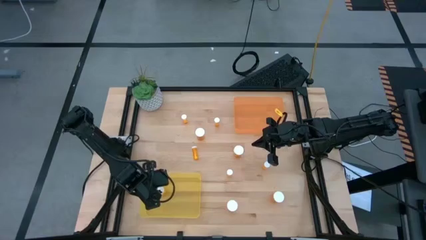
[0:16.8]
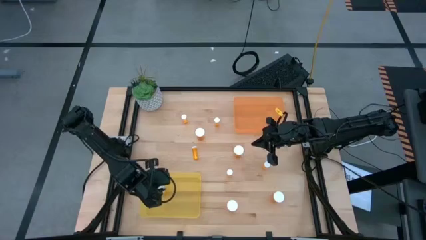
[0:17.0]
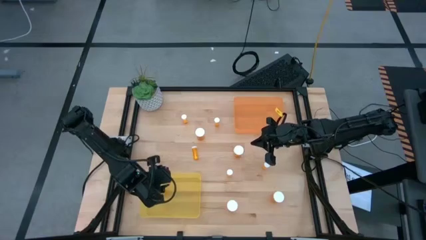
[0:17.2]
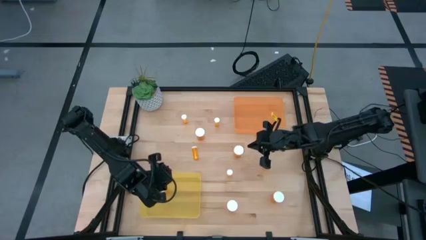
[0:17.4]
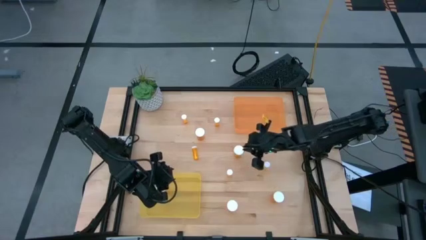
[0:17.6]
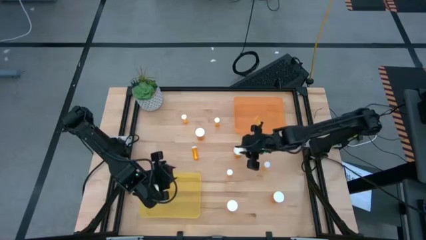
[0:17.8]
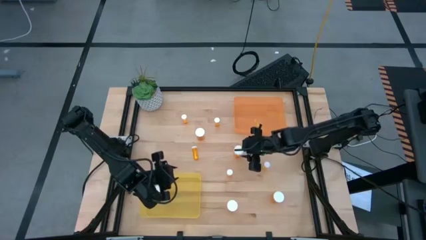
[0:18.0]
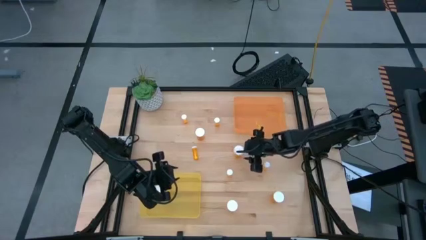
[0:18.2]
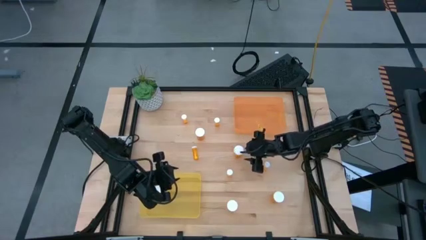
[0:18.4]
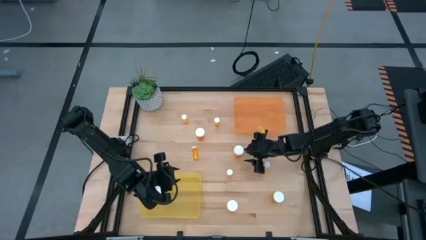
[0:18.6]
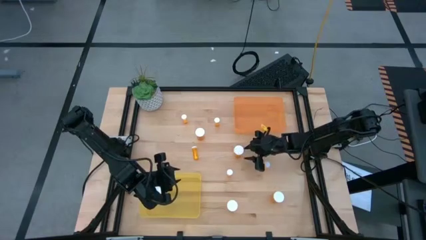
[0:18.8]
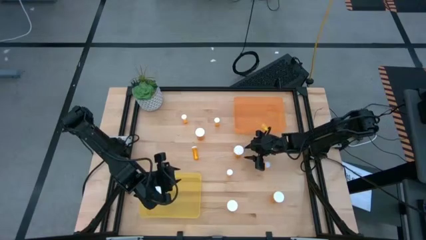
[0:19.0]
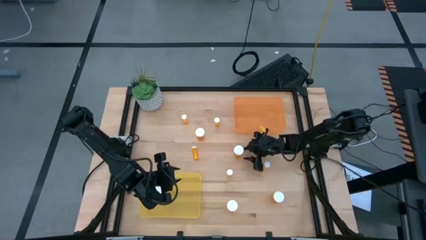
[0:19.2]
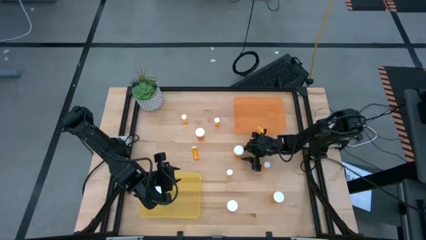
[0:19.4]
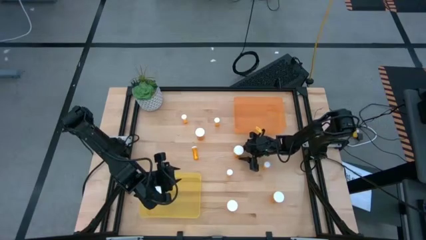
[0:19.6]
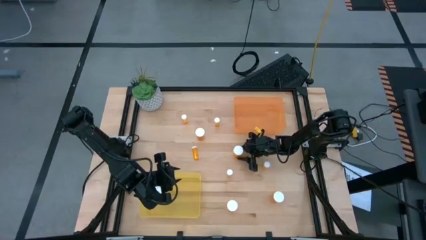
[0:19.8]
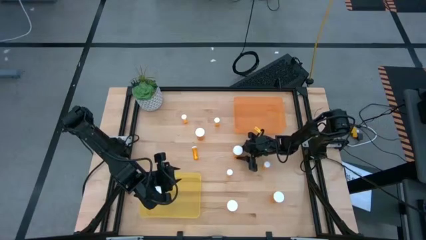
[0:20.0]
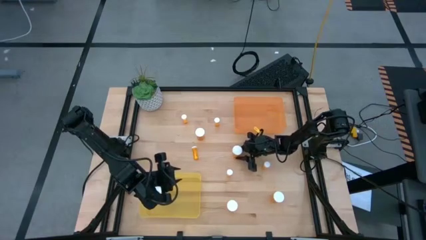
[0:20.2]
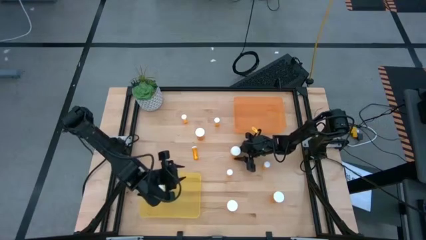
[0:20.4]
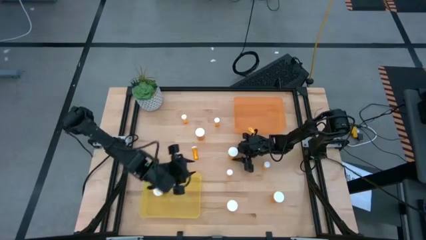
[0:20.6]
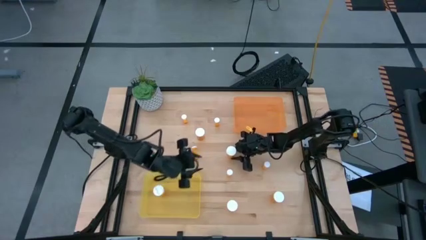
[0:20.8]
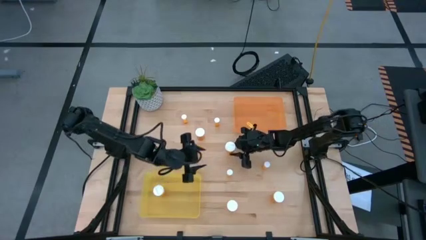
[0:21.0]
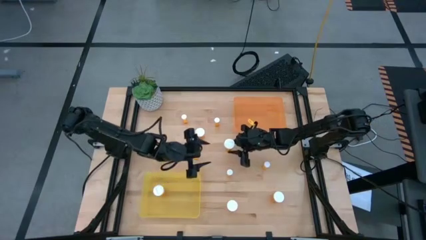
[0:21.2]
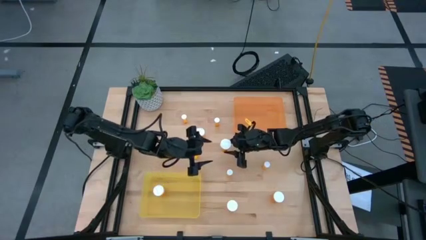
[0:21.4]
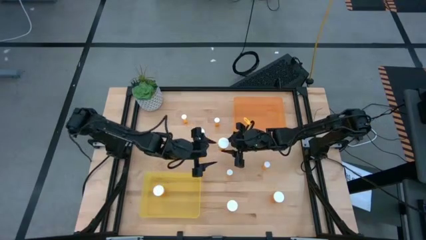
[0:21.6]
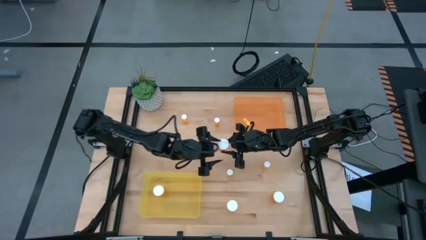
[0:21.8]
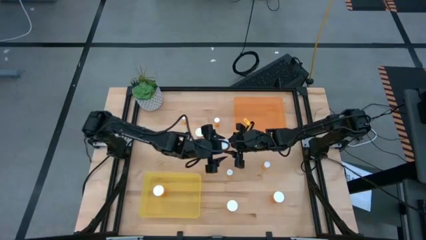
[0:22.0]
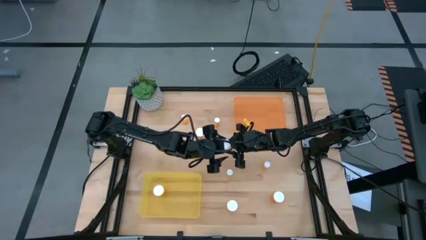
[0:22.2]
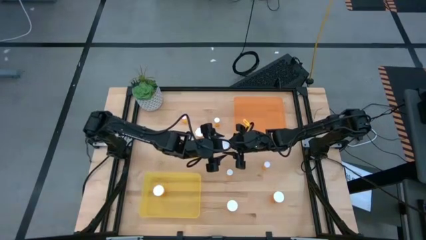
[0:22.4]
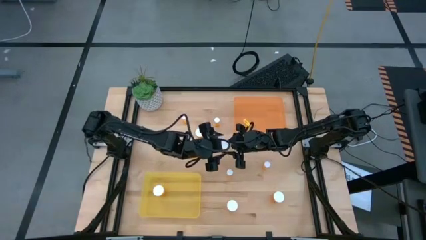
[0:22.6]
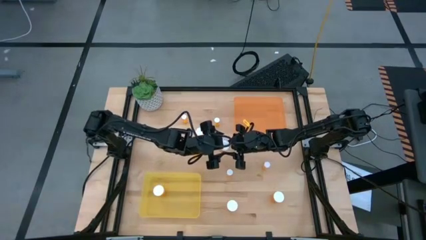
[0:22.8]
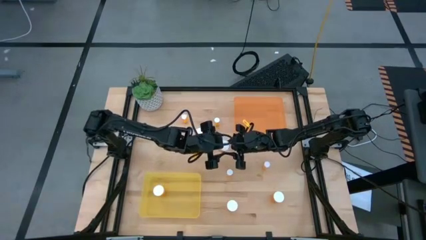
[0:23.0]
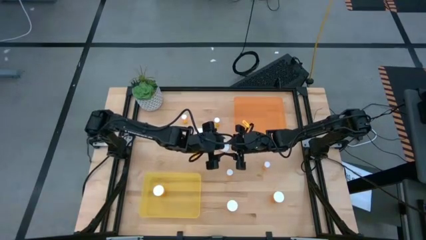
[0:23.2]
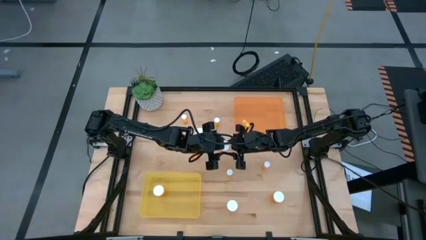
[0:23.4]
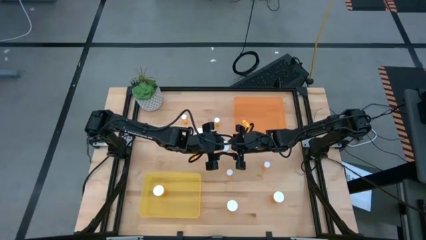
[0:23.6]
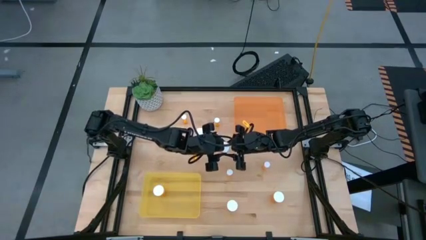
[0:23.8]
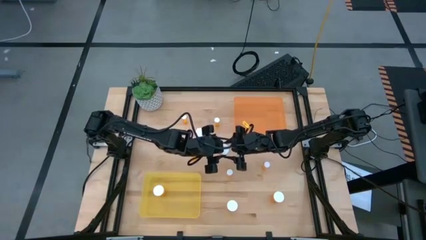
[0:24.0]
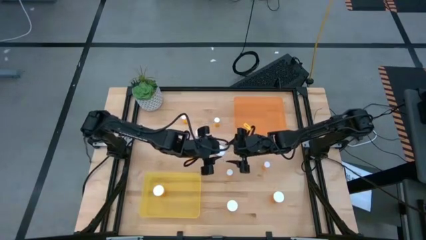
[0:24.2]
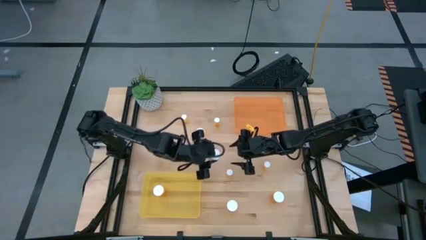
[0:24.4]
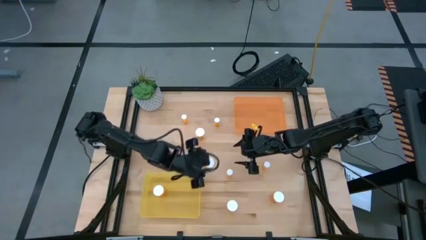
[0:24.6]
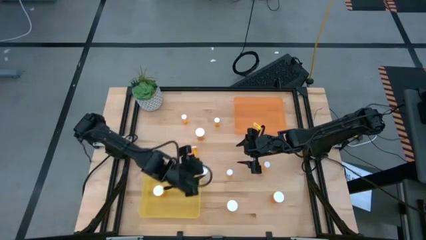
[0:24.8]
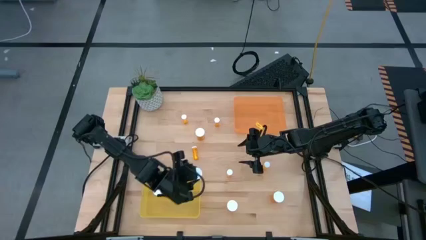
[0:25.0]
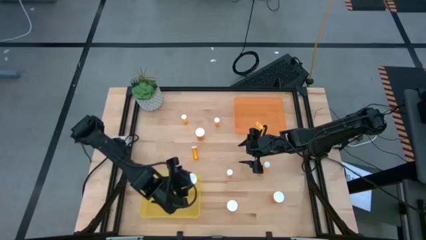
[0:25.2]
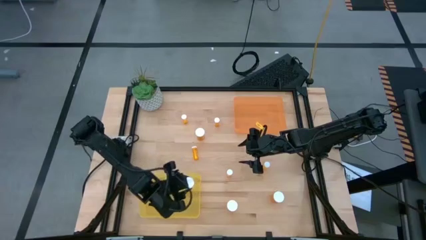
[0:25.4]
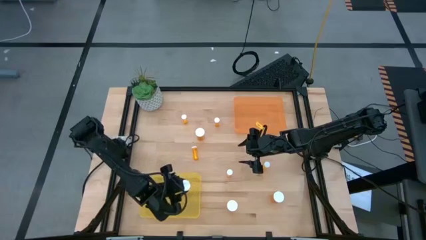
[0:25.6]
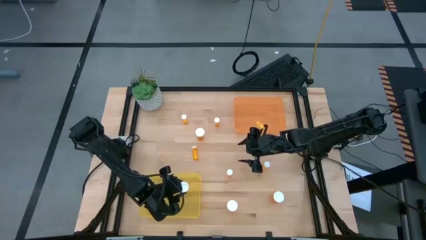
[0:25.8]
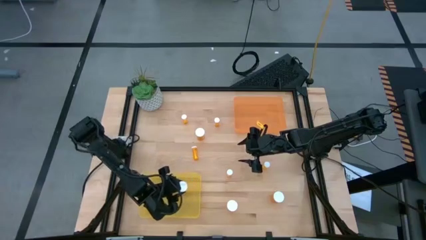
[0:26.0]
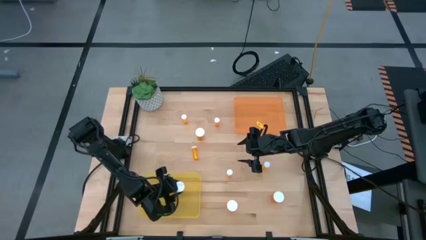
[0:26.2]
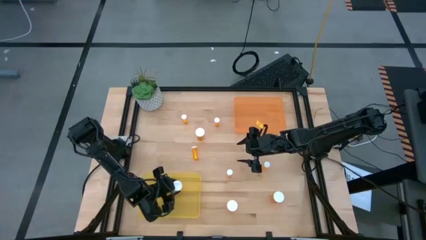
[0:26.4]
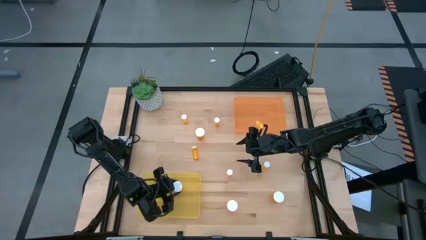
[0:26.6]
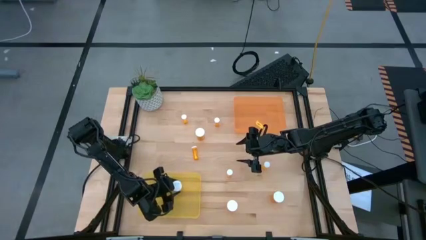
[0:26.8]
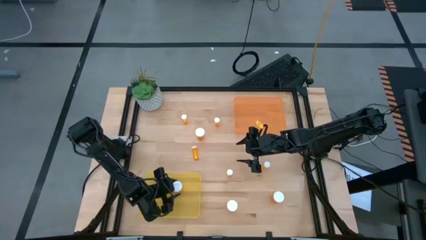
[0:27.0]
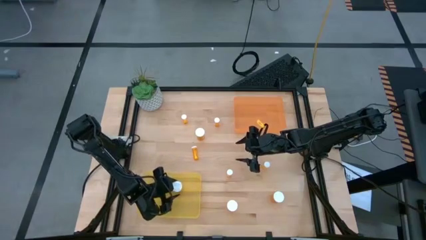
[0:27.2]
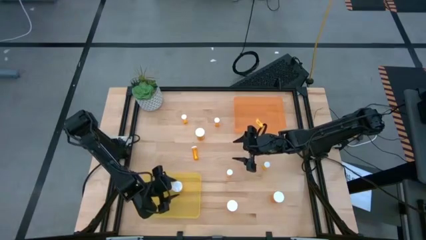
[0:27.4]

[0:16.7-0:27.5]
Task: Pick and place medicine bottles into bin by pill shape (circle, oval)
Put the large pill bottle into the yellow bin

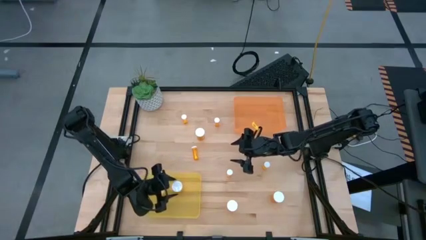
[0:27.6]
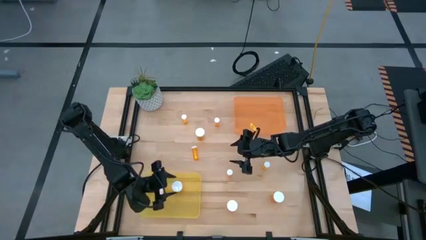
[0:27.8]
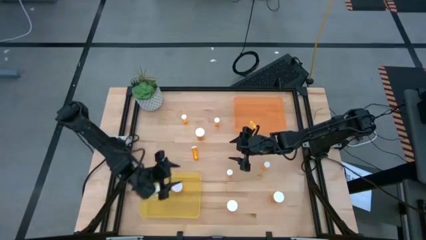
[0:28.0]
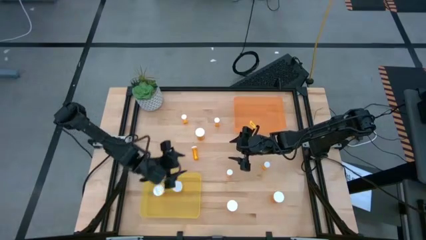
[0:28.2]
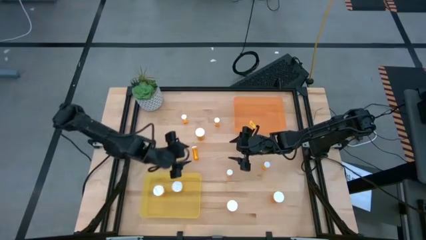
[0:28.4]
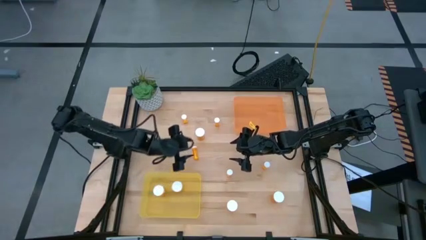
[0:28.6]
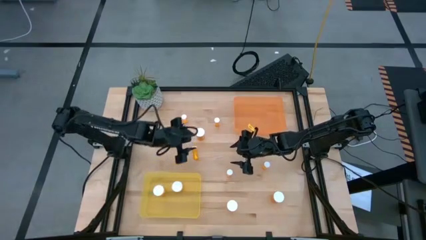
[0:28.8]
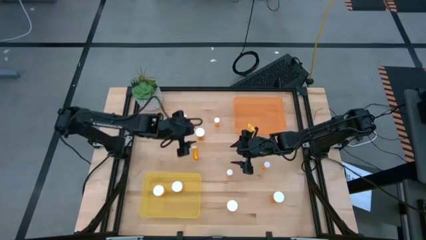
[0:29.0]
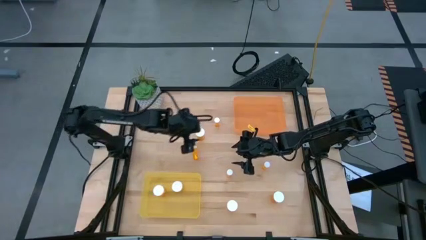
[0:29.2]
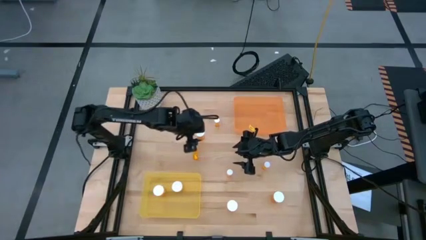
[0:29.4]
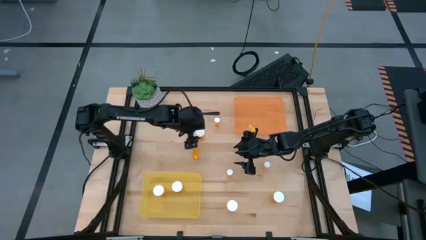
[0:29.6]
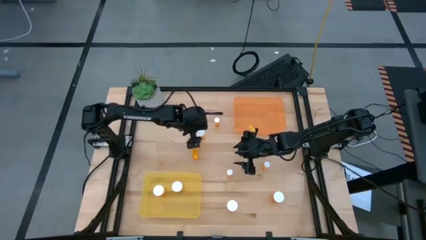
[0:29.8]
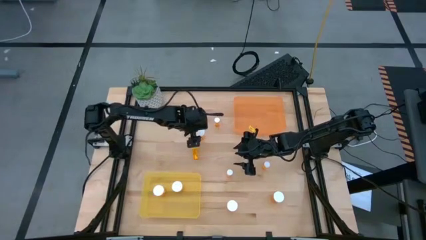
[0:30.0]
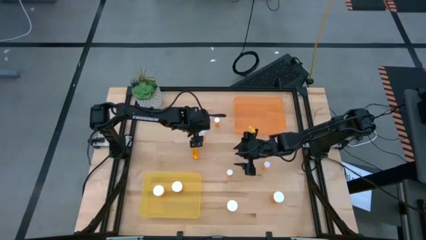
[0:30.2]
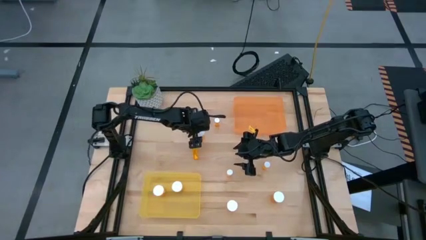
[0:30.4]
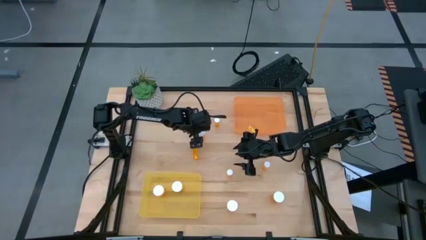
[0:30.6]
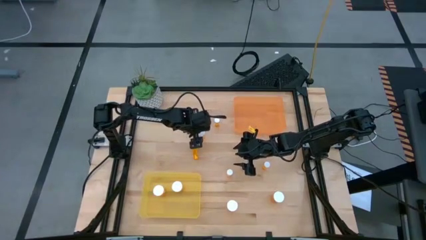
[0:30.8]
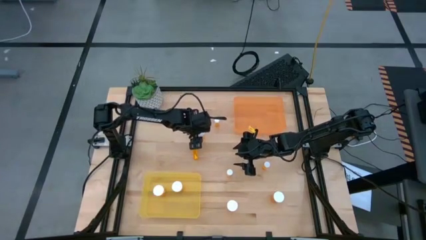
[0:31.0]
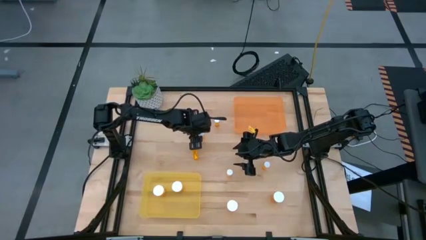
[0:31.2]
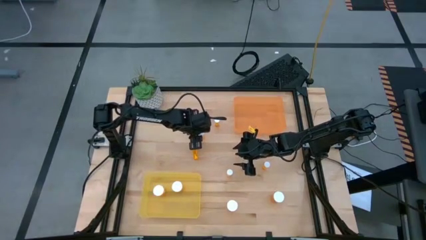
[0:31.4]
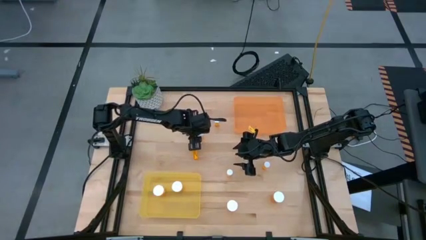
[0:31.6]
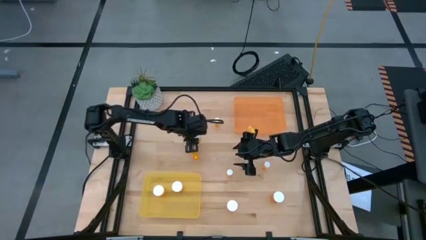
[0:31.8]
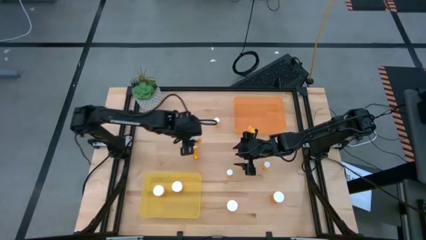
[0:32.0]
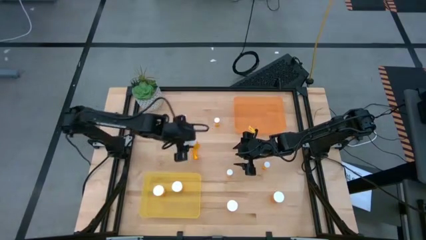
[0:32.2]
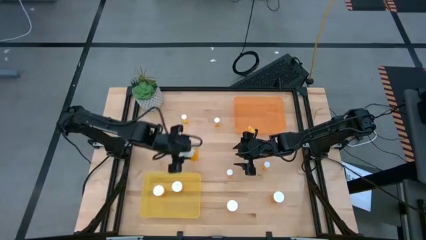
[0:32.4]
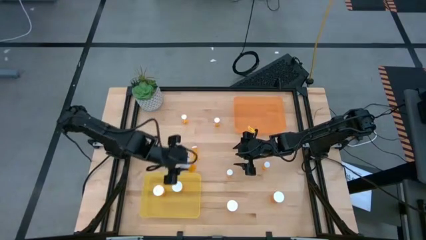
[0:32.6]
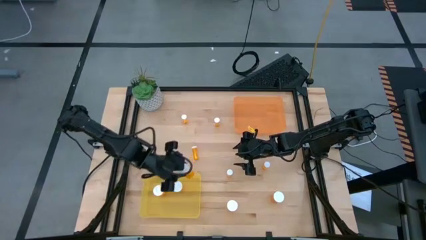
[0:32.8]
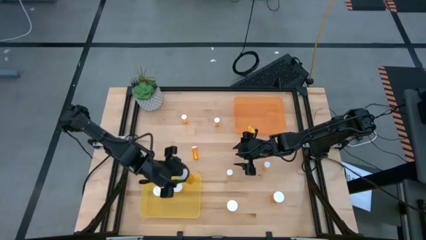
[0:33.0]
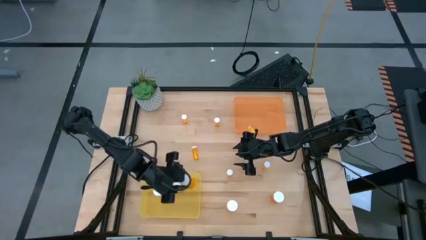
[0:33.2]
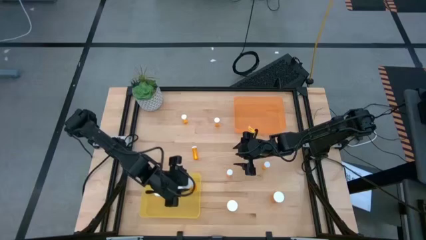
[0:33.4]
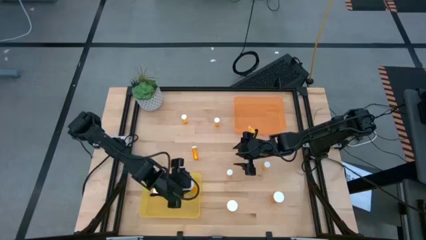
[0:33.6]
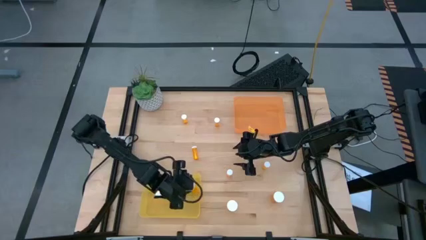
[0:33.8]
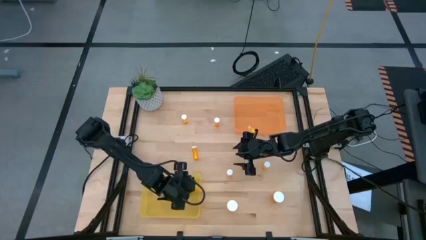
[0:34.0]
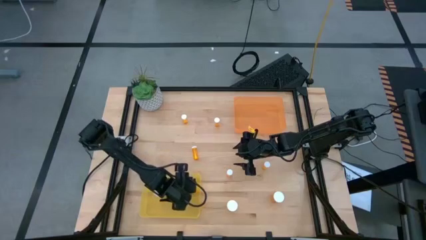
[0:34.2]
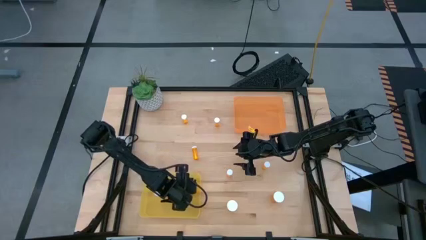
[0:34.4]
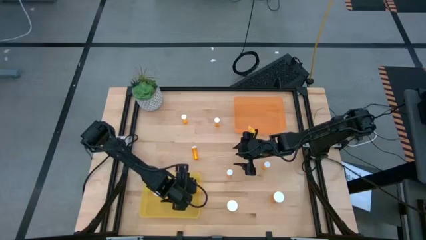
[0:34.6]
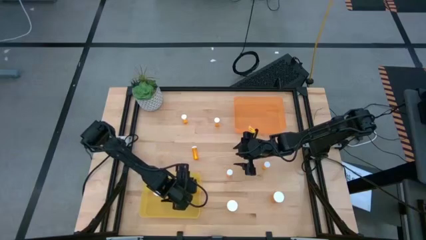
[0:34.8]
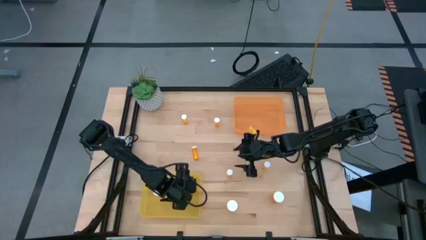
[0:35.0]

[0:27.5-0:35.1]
Put the large pill bottle into the yellow bin
